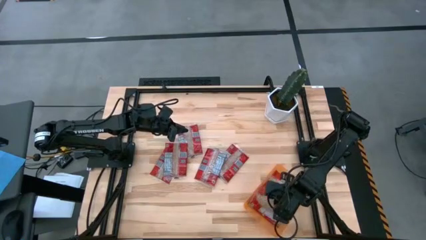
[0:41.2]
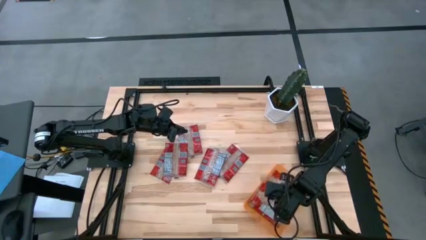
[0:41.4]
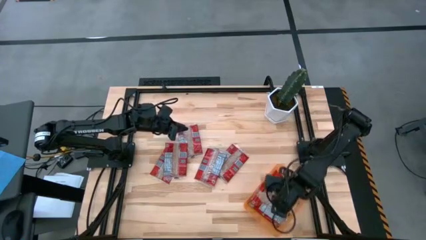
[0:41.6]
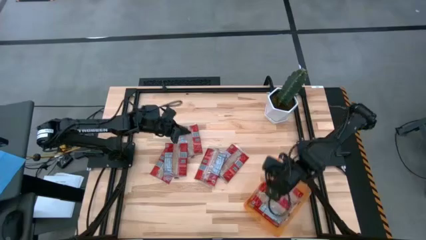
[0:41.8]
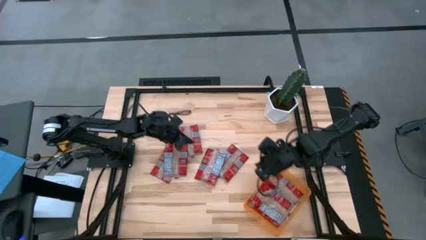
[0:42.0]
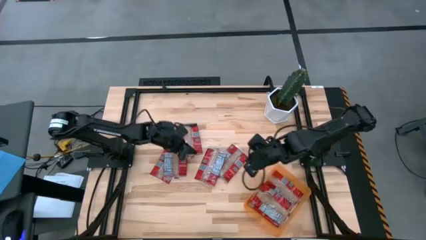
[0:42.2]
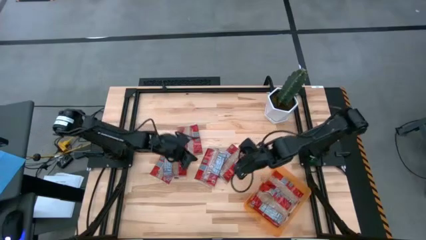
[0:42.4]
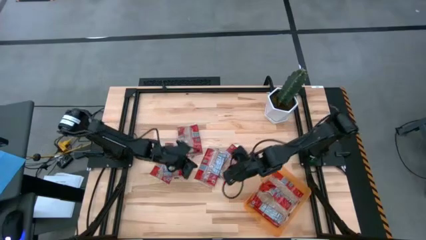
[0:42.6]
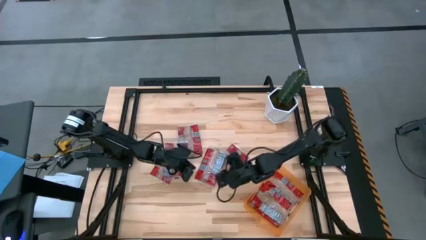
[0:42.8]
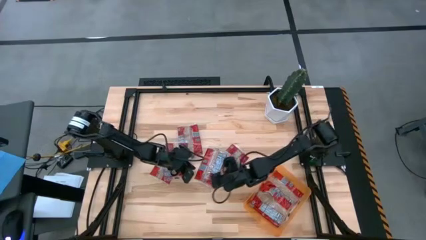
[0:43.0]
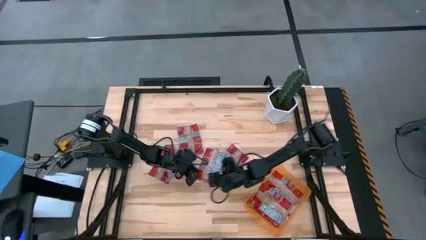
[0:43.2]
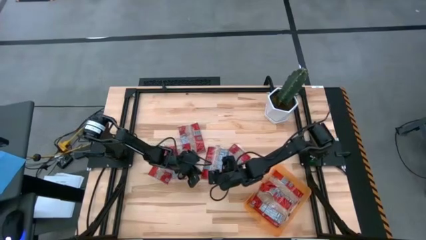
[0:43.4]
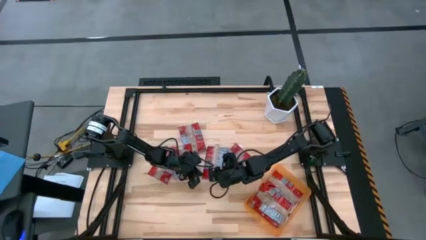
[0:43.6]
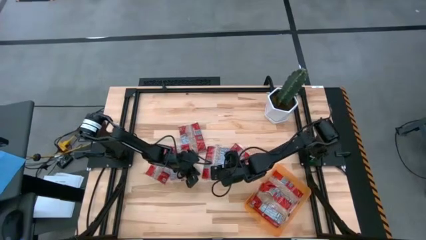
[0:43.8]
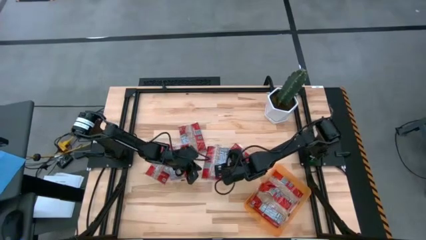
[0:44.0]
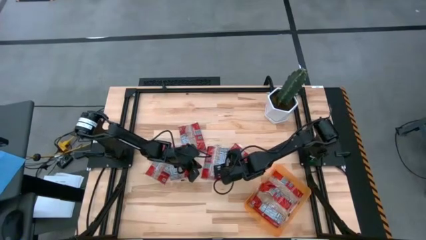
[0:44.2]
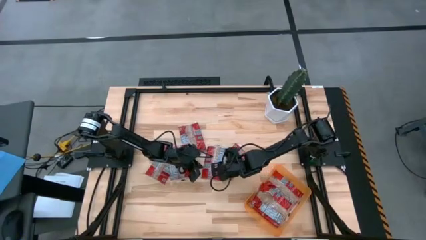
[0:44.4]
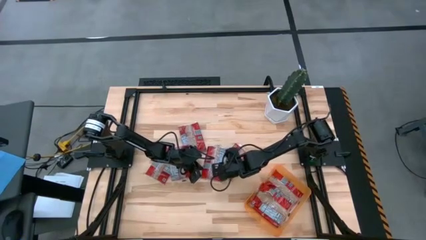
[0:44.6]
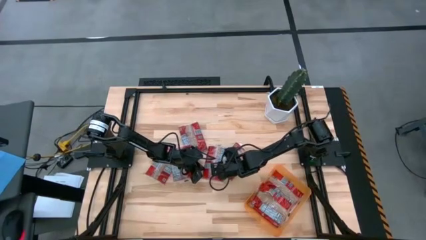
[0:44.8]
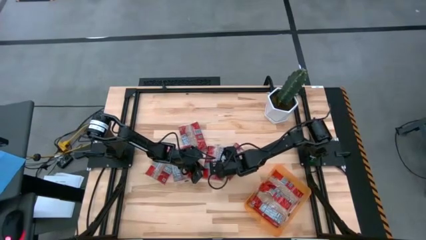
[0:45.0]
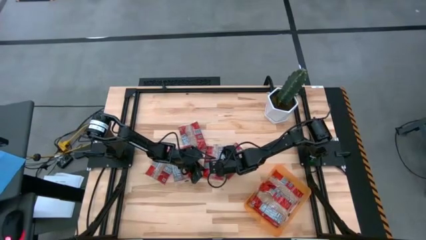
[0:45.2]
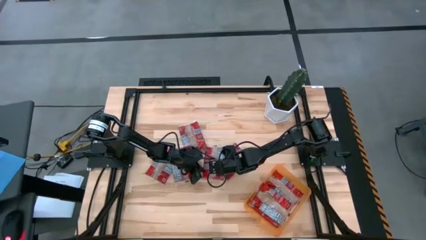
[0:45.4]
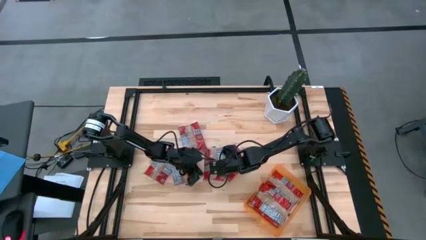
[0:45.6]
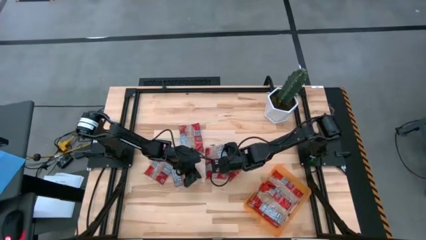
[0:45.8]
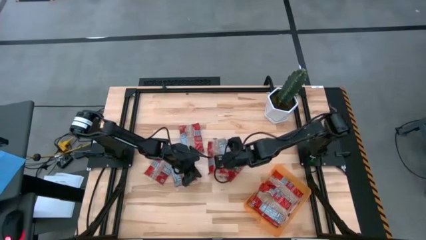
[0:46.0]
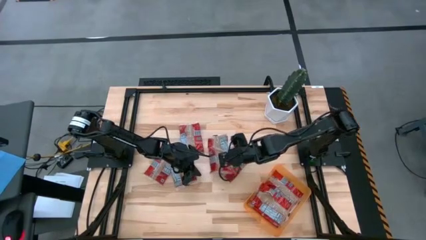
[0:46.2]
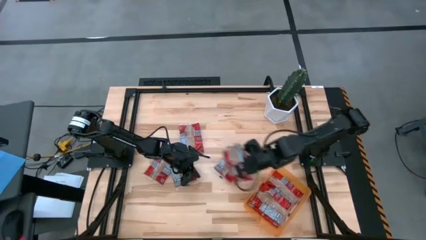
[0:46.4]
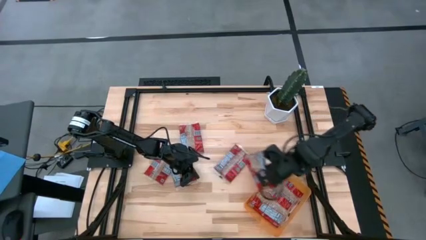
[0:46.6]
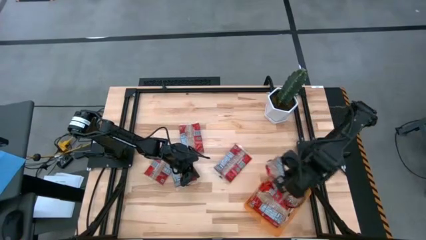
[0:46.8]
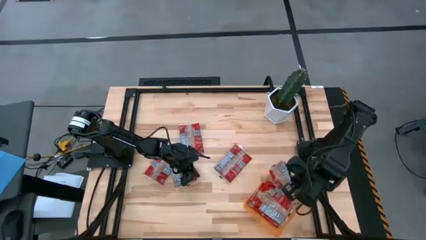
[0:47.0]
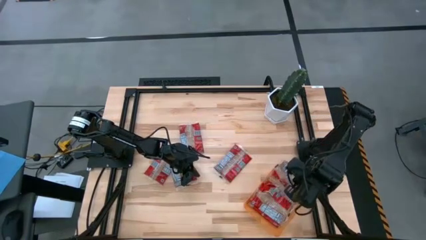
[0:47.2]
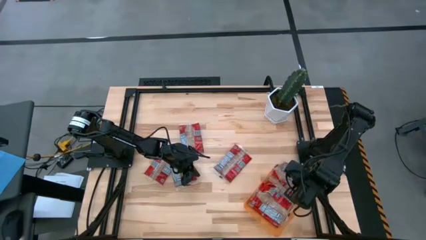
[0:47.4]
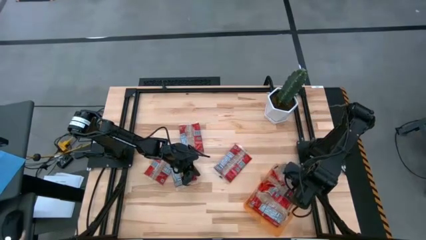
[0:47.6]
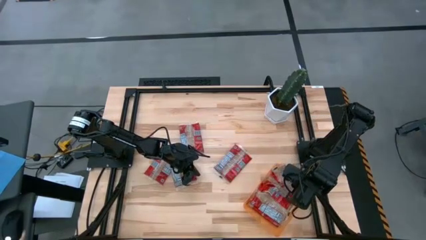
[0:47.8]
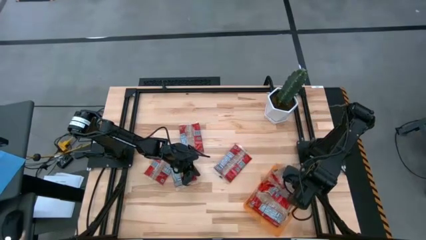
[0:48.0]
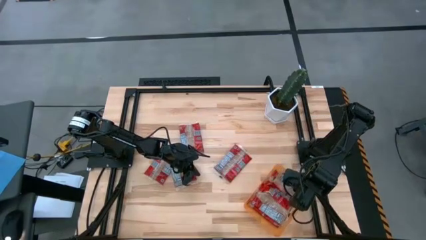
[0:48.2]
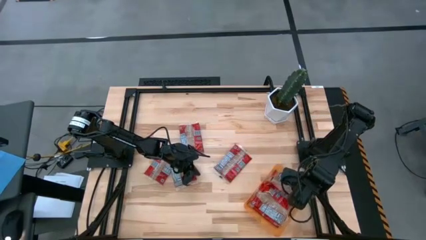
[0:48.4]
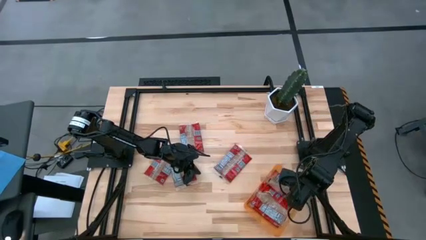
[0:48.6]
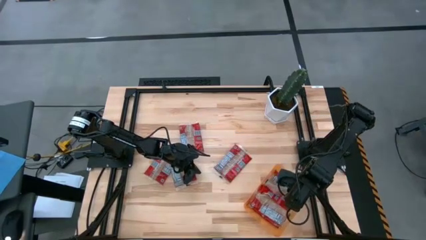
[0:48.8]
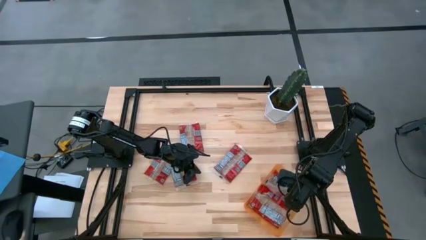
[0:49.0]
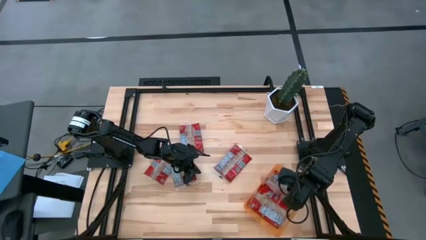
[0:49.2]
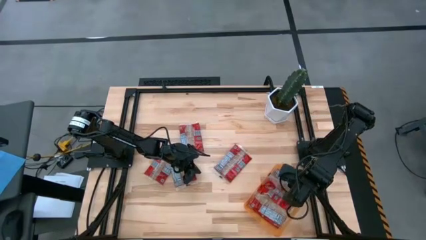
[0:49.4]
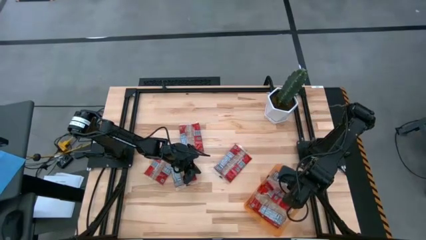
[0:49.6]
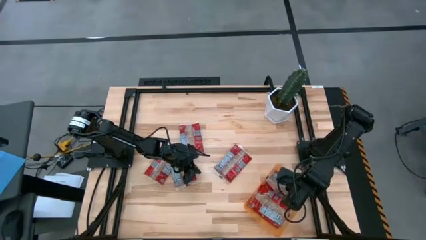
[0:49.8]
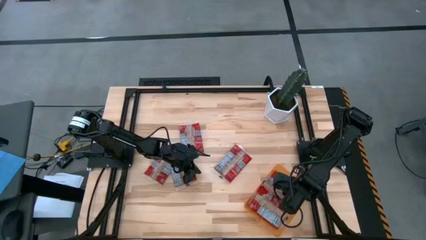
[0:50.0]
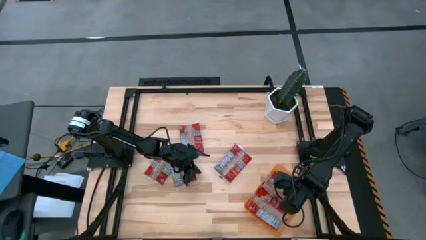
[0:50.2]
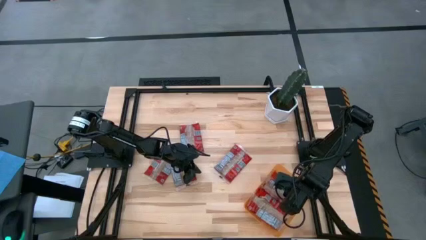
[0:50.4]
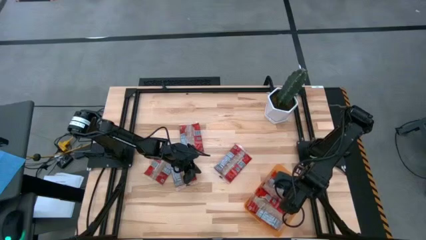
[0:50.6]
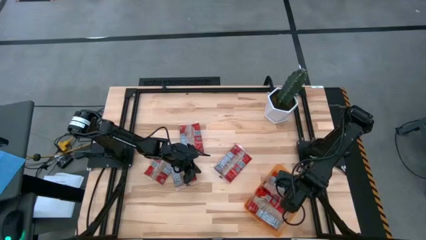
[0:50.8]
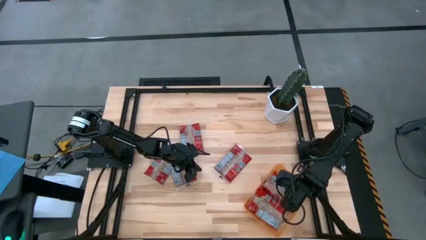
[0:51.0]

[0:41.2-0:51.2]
Task: Sort popcorn bags into baskets
Put the red popcorn bag into the orange bin

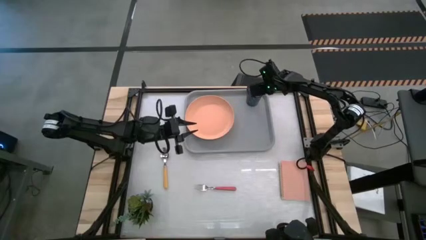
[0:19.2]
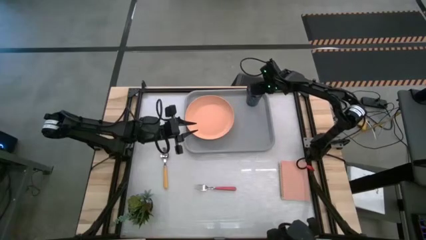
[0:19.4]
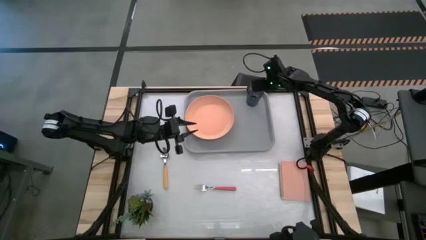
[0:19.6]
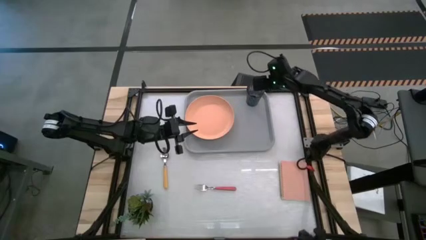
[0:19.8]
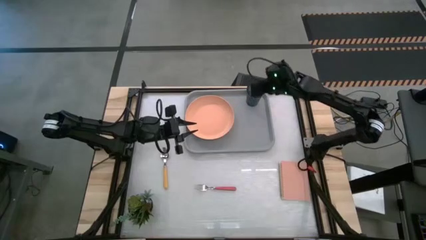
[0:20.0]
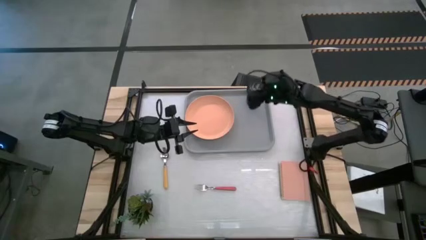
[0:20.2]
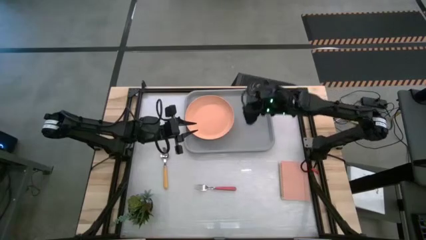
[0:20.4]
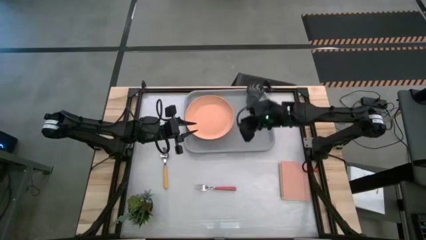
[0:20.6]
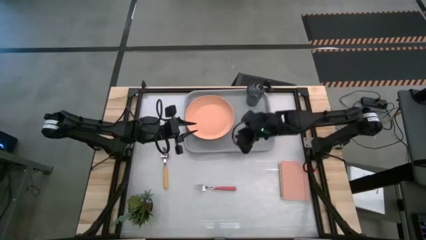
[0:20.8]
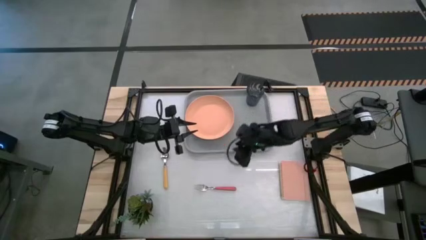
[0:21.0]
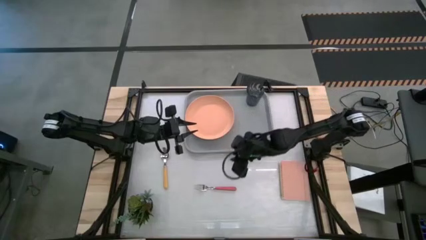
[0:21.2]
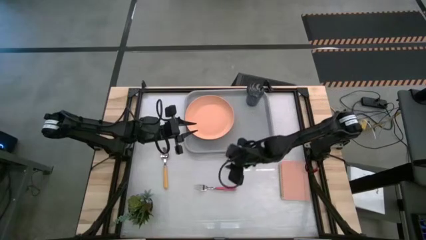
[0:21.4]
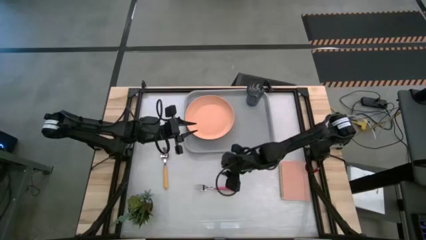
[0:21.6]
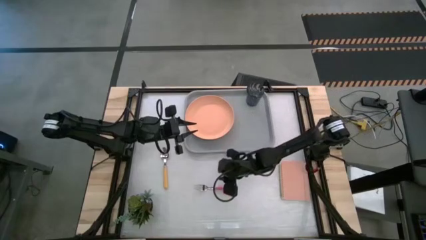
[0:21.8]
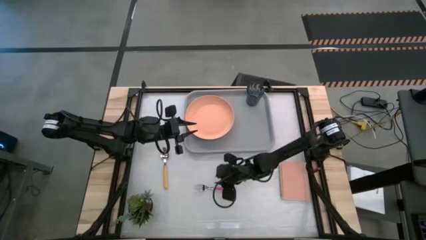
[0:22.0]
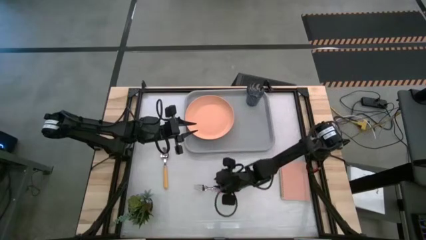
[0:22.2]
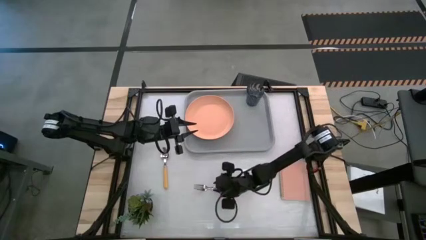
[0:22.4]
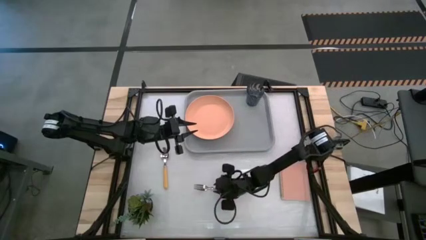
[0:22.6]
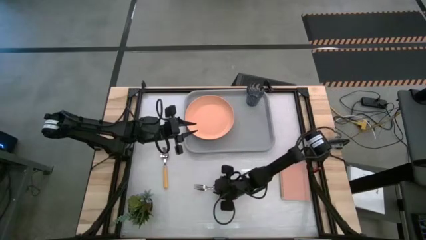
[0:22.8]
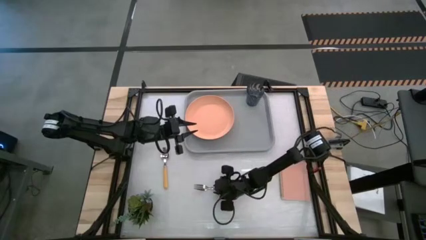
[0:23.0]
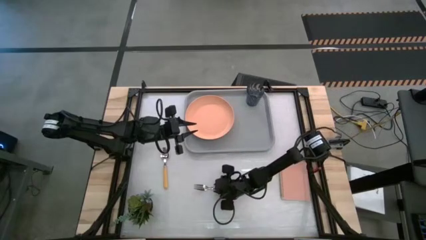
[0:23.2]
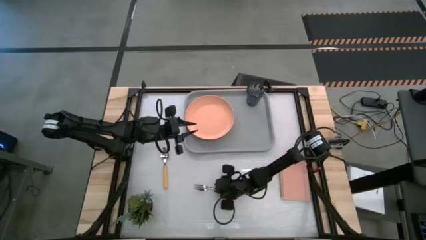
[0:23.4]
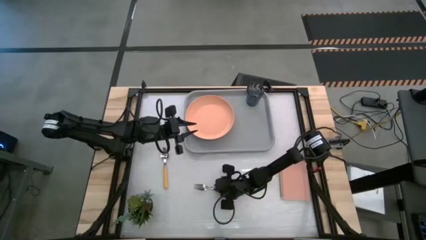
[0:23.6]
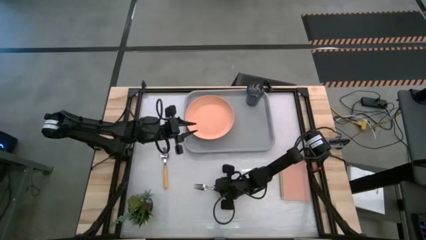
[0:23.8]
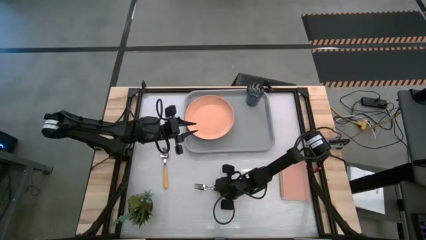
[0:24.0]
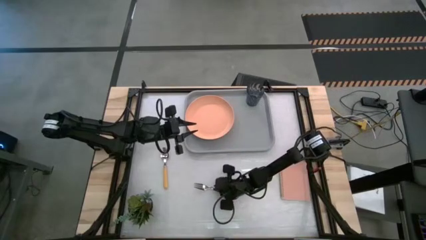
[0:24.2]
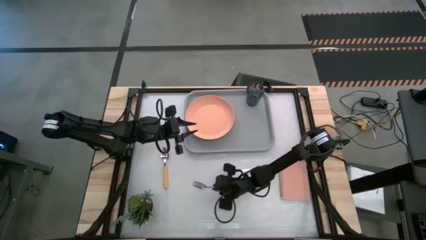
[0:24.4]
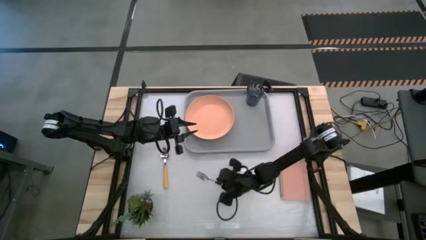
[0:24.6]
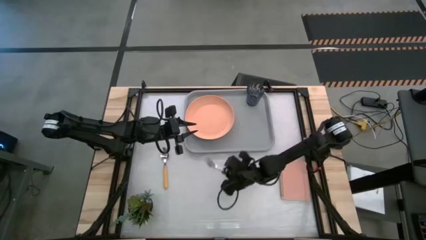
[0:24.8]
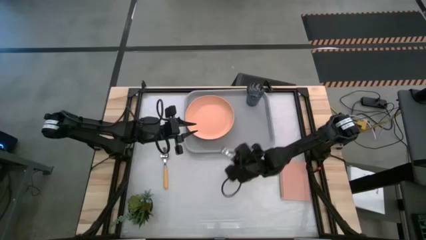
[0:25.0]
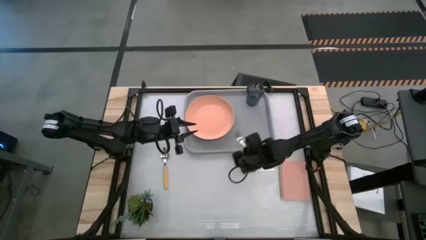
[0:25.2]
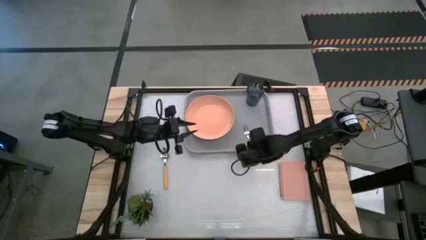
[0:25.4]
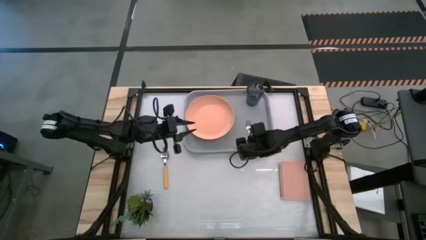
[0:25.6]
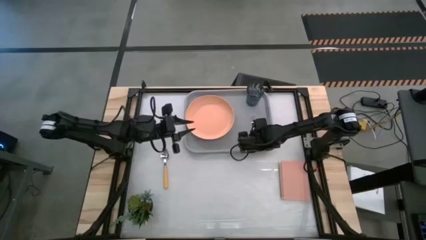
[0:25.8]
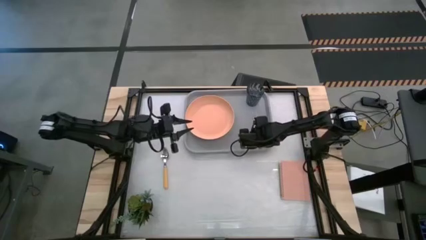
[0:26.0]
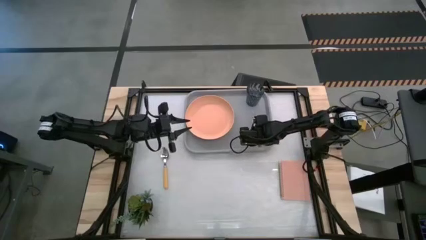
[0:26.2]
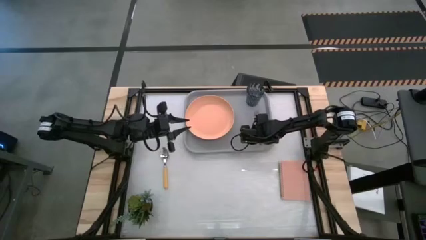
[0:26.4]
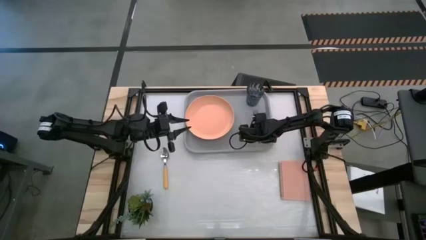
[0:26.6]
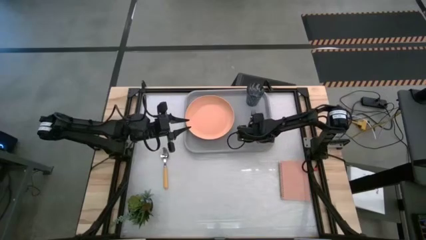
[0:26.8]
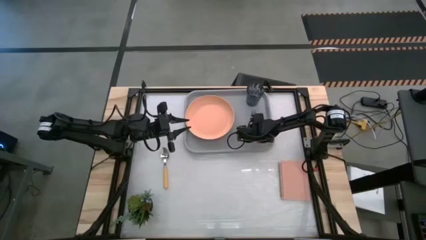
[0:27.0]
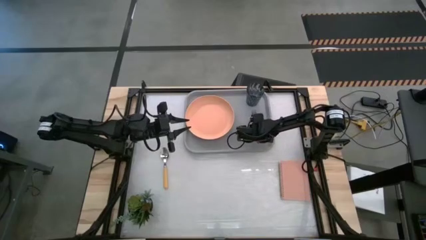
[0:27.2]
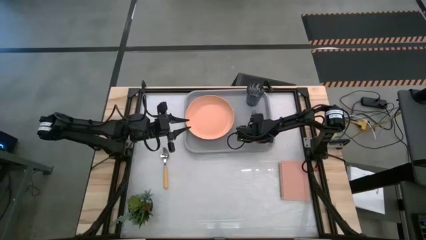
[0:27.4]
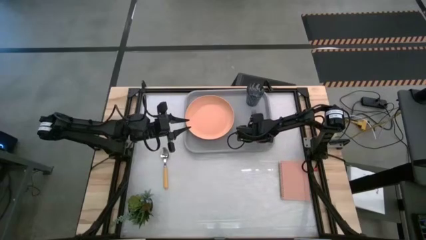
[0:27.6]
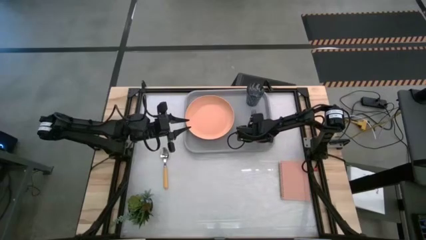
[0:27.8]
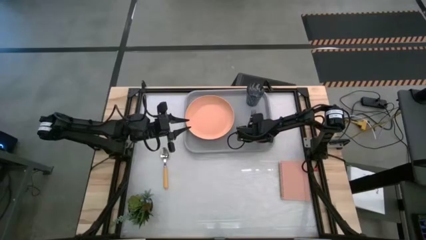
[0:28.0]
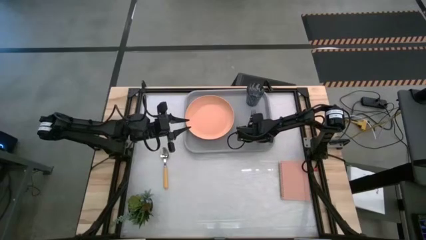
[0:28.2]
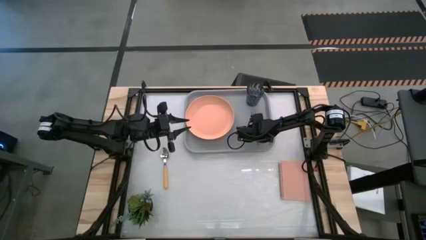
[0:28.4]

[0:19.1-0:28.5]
Task: Pick and place plate/cup/fork/spoon on tray
Put the pink fork on the gray serving tray to the right of the orange plate
